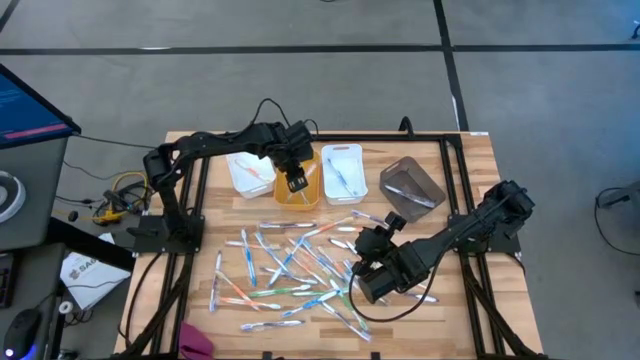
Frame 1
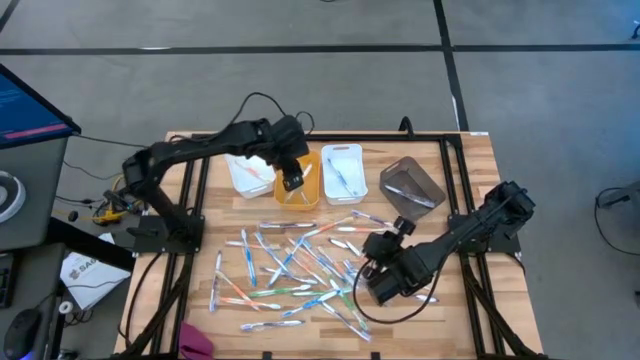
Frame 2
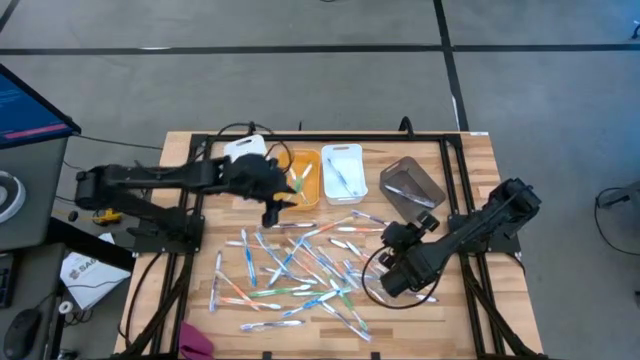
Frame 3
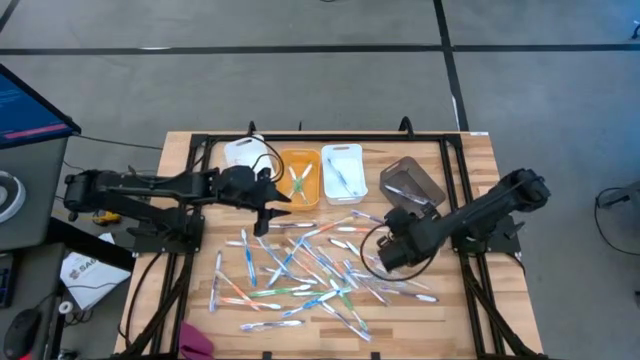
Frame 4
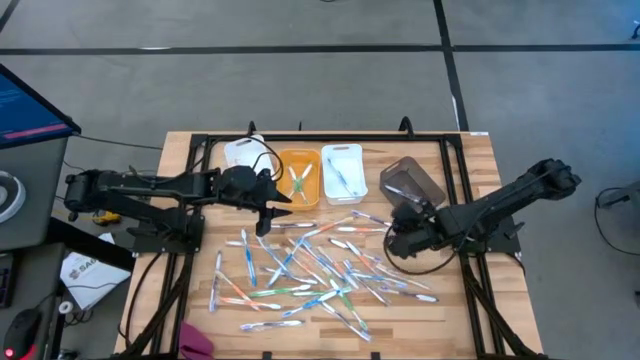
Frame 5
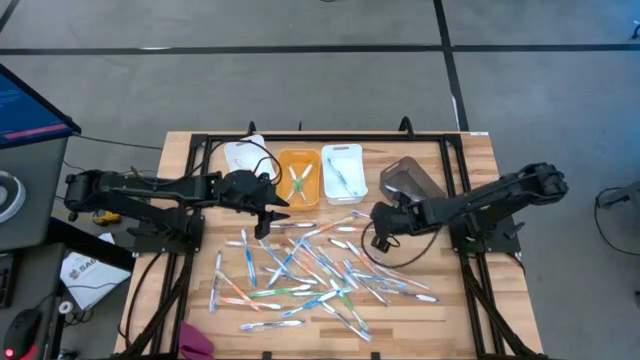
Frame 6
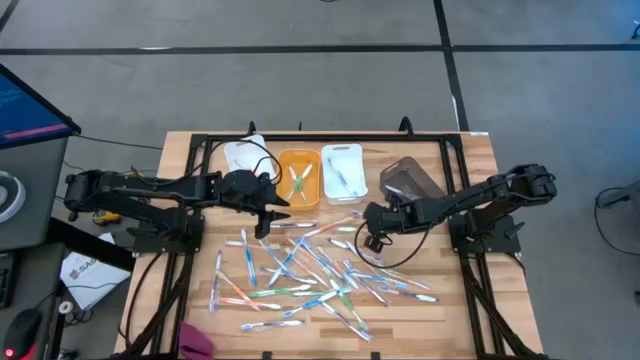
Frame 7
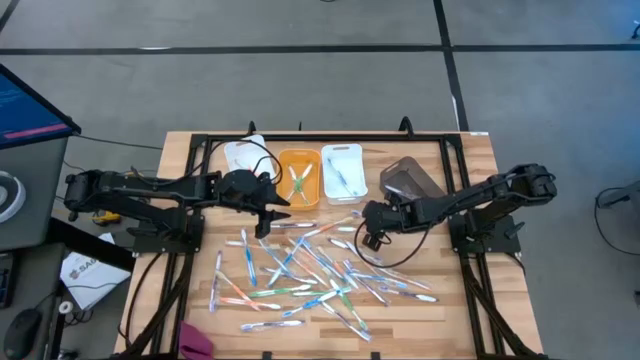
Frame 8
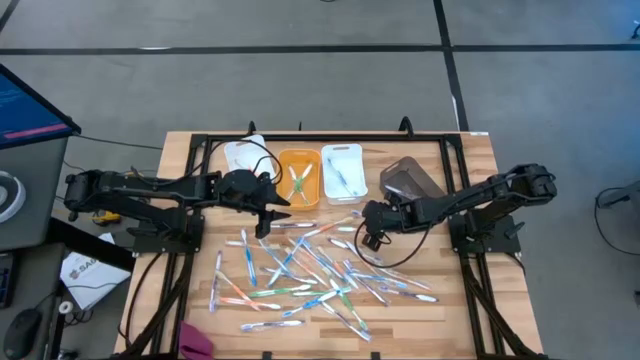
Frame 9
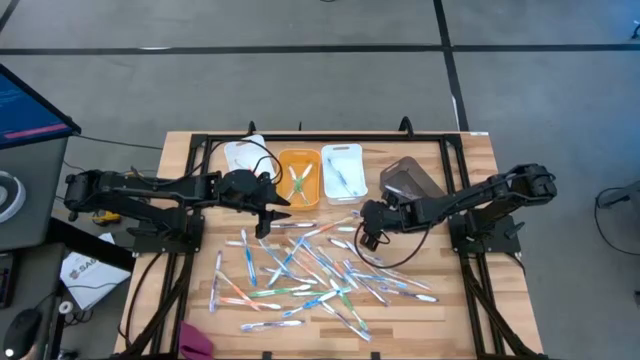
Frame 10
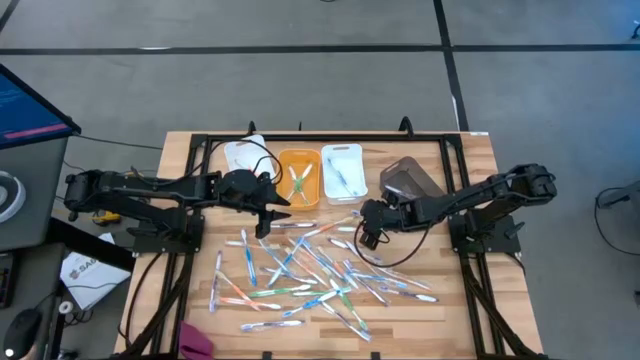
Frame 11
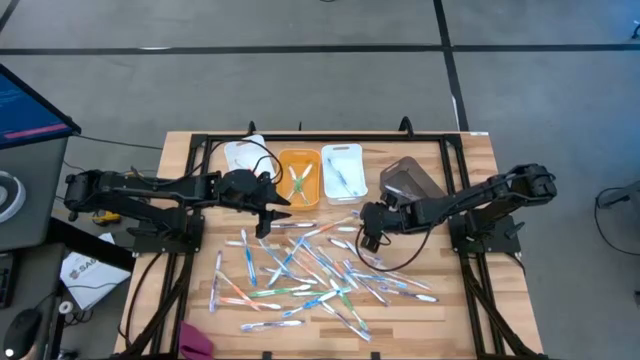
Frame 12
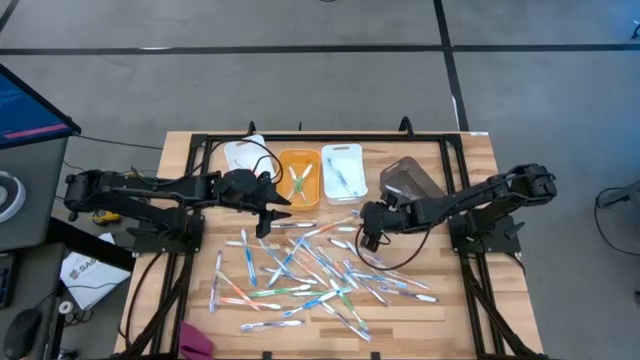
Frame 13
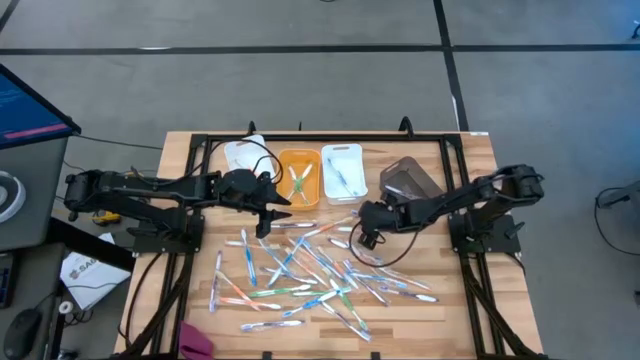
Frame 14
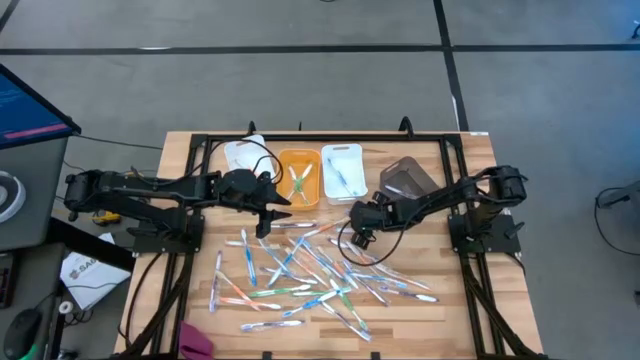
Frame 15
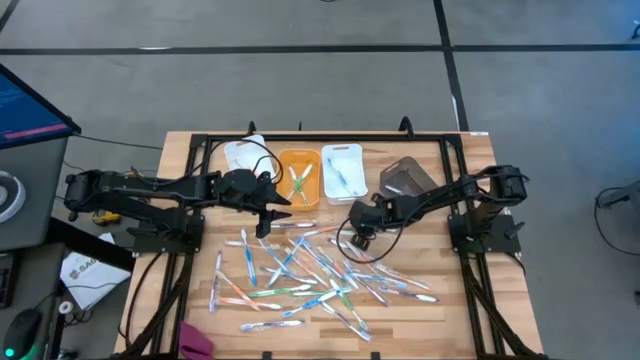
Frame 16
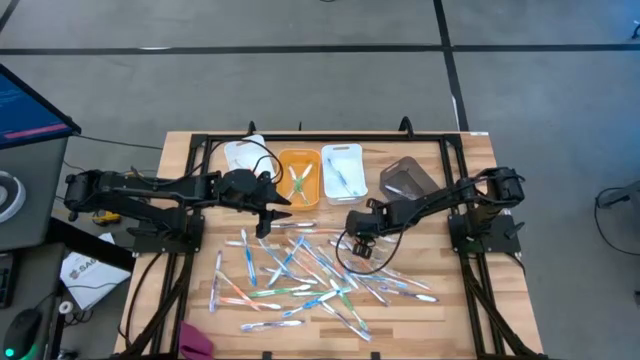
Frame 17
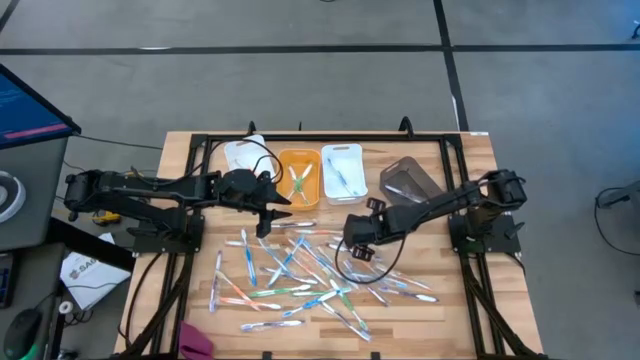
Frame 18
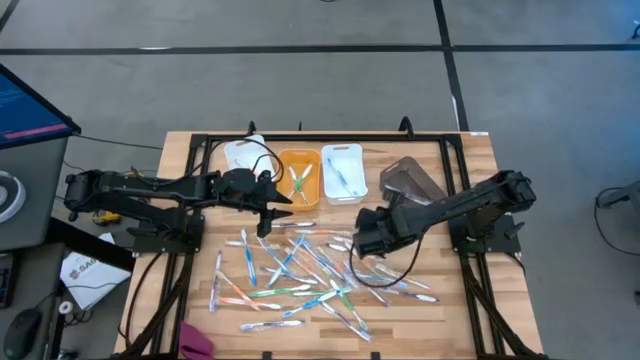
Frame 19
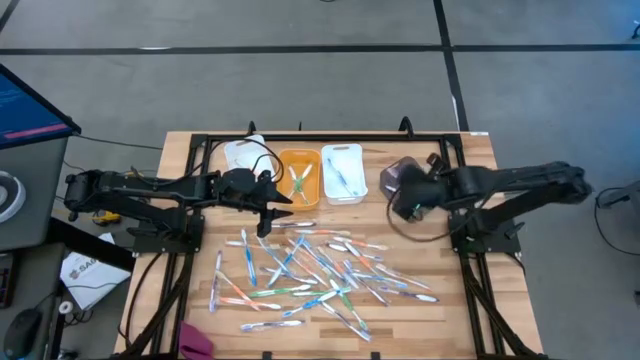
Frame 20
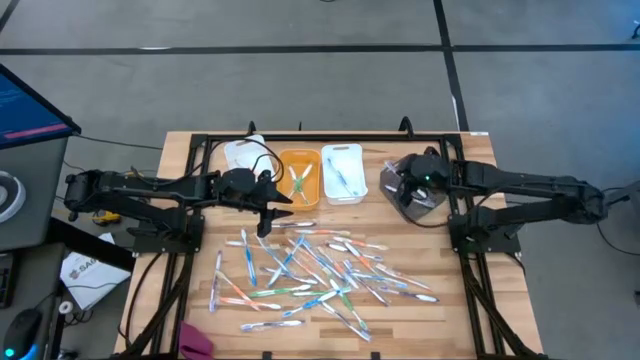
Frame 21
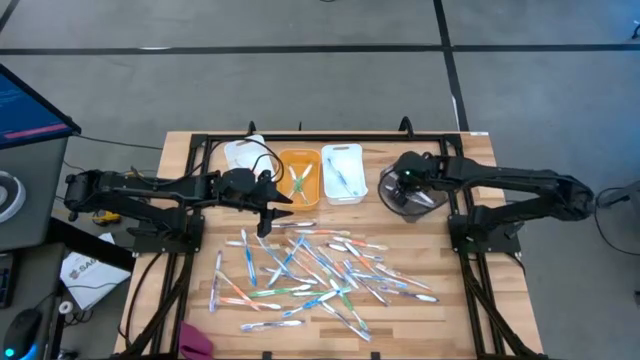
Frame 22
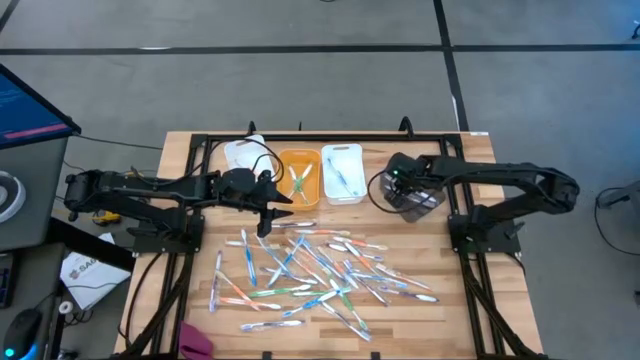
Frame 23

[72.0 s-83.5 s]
Task: Pick & Place Toothbrushes
Put the white violet toothbrush into the black transparent bin

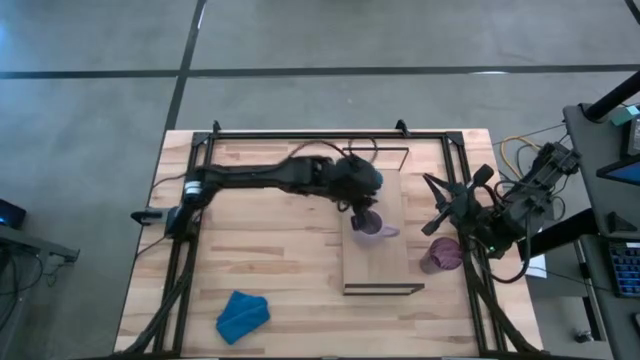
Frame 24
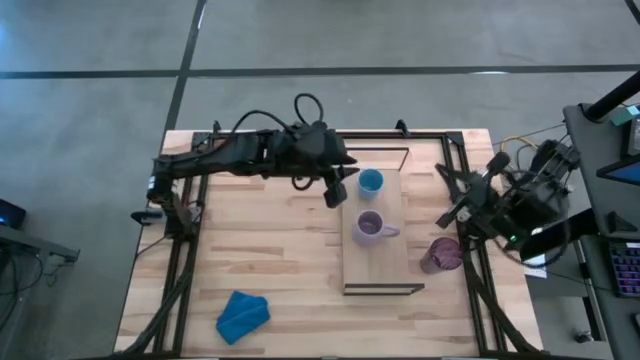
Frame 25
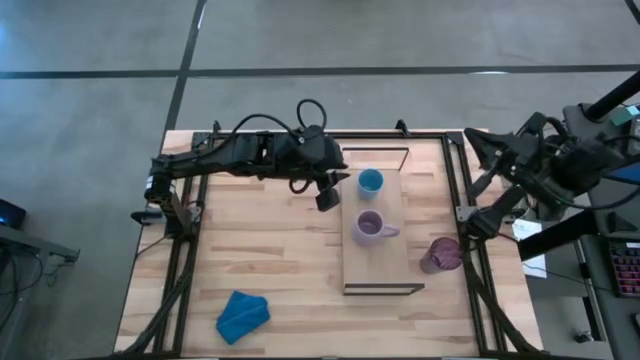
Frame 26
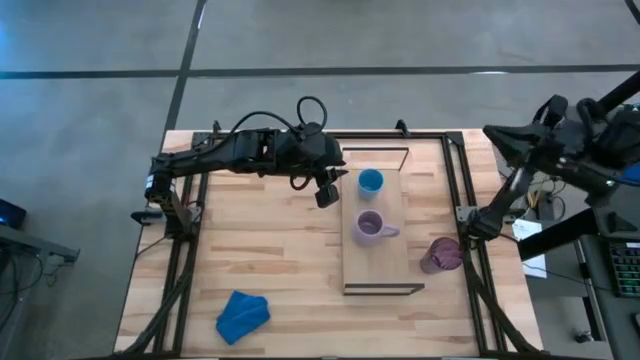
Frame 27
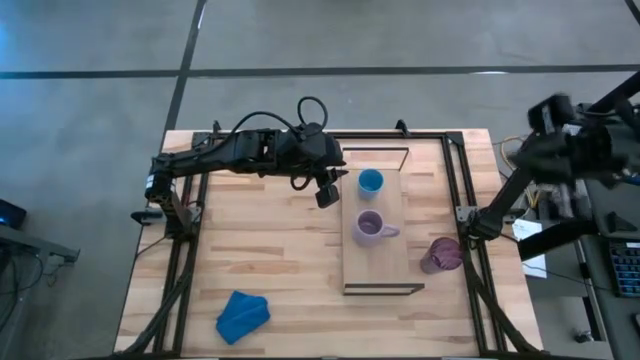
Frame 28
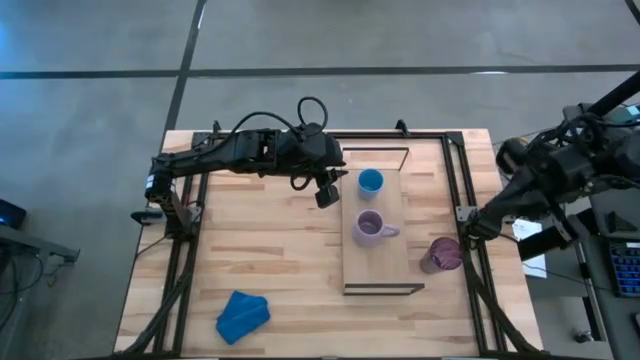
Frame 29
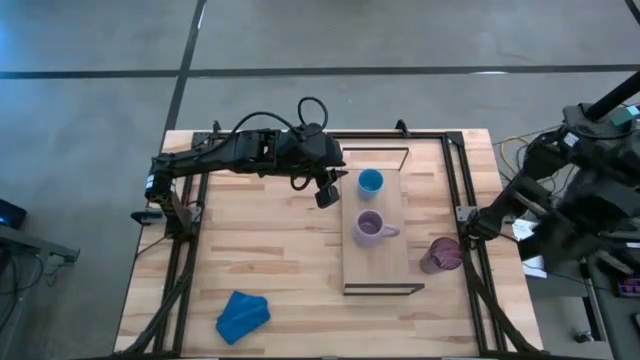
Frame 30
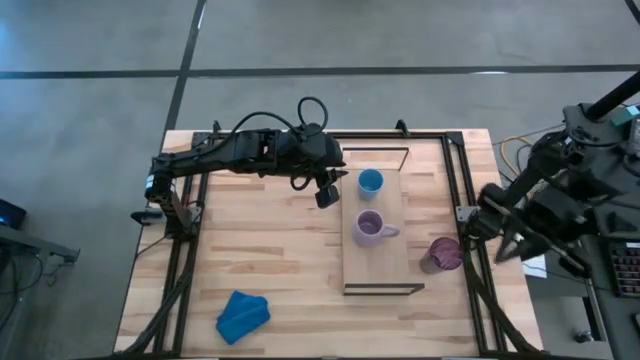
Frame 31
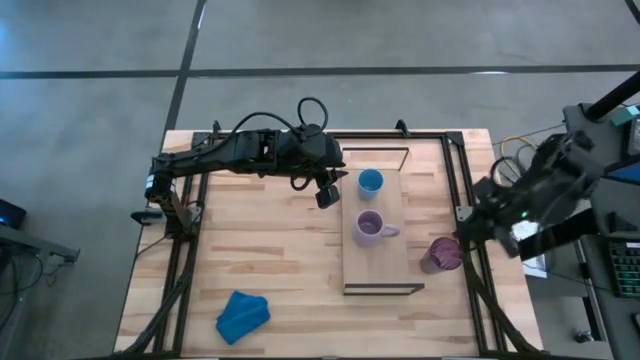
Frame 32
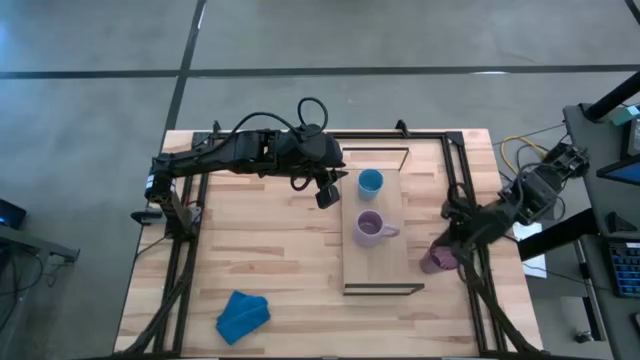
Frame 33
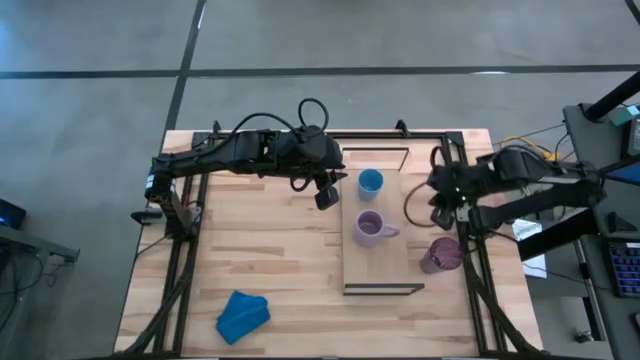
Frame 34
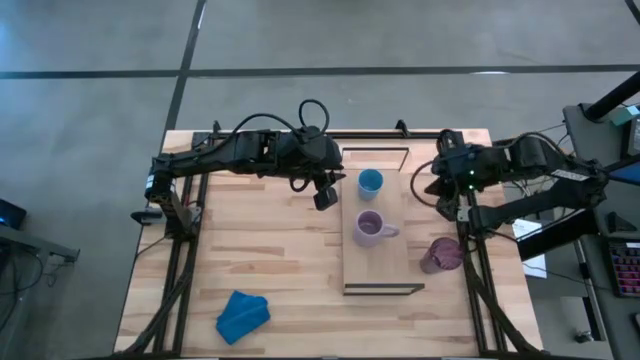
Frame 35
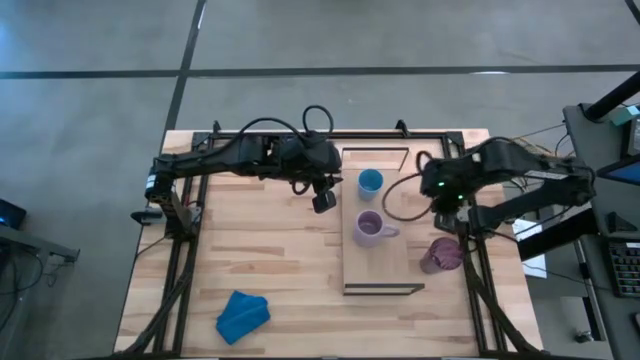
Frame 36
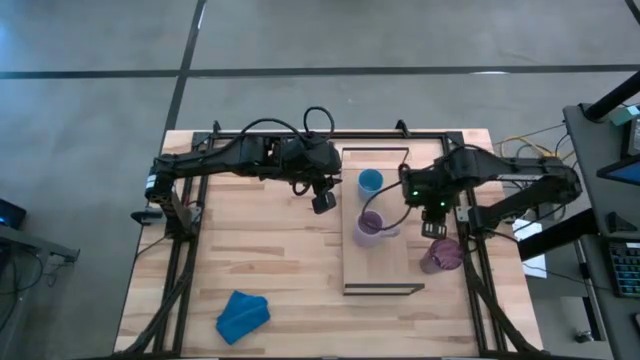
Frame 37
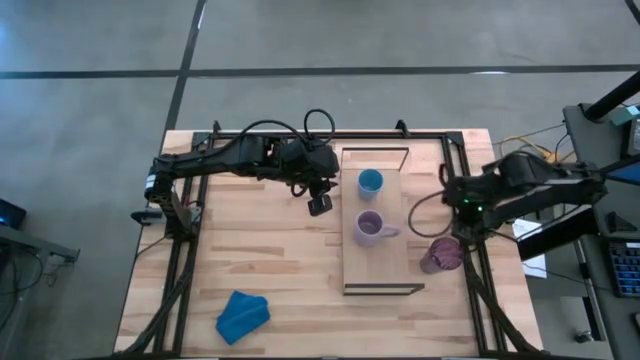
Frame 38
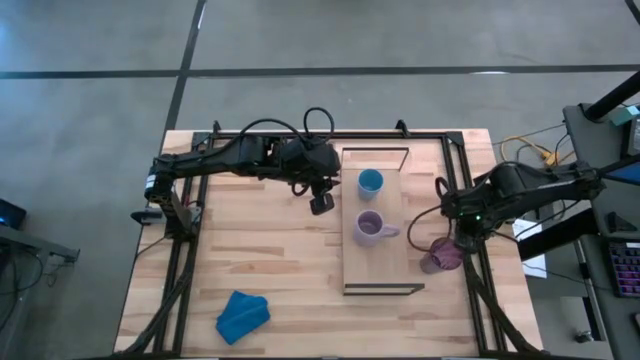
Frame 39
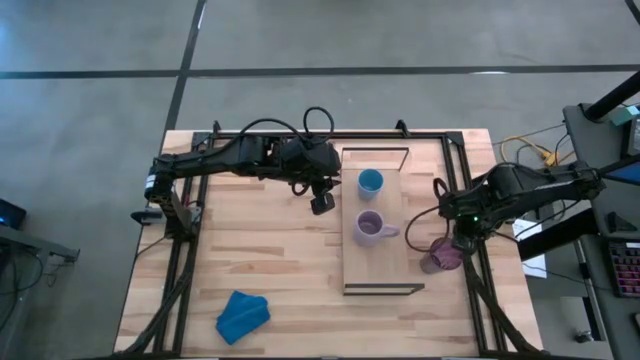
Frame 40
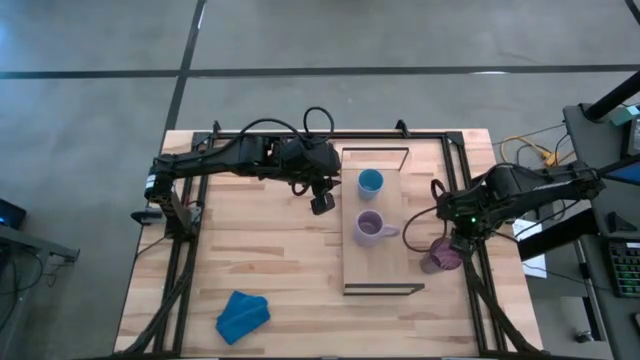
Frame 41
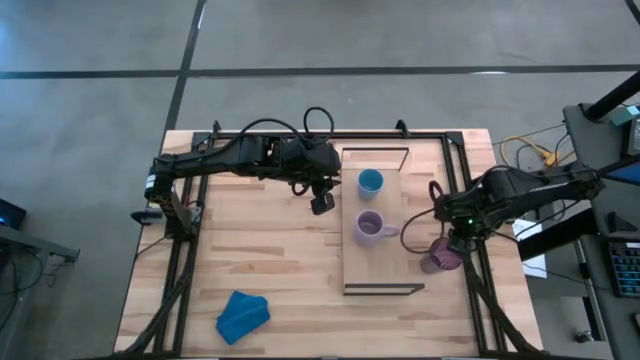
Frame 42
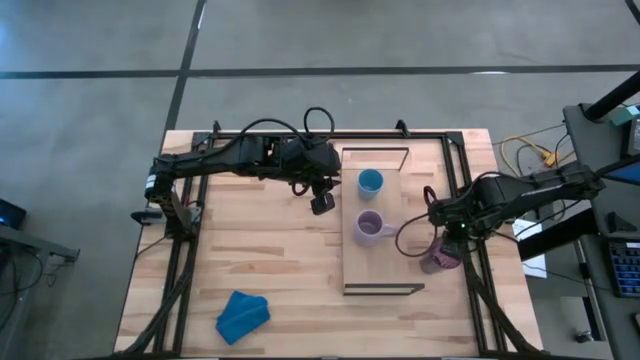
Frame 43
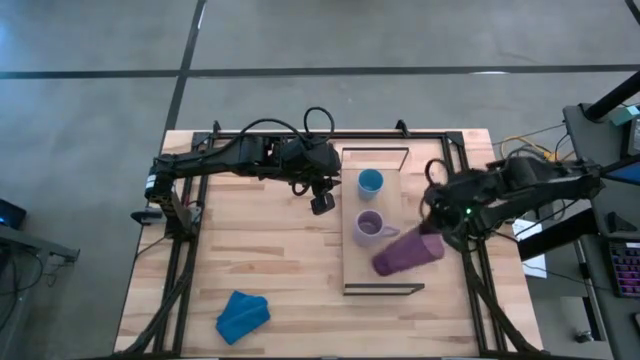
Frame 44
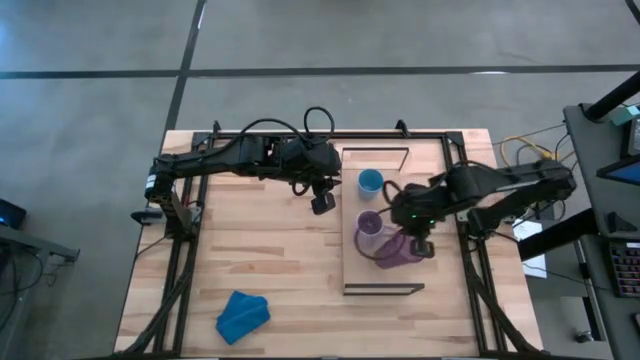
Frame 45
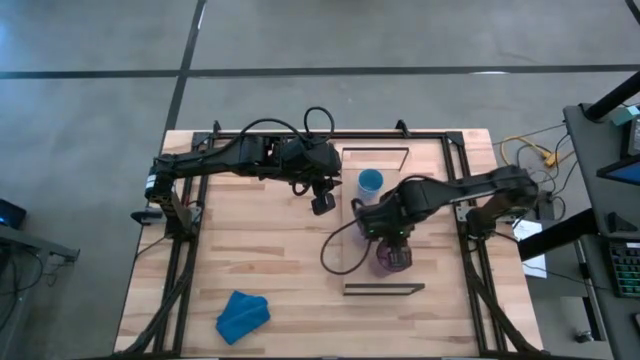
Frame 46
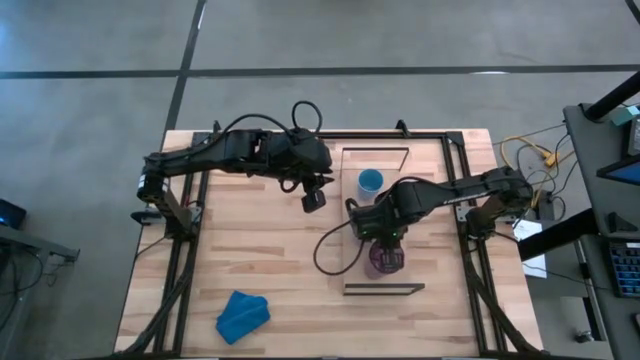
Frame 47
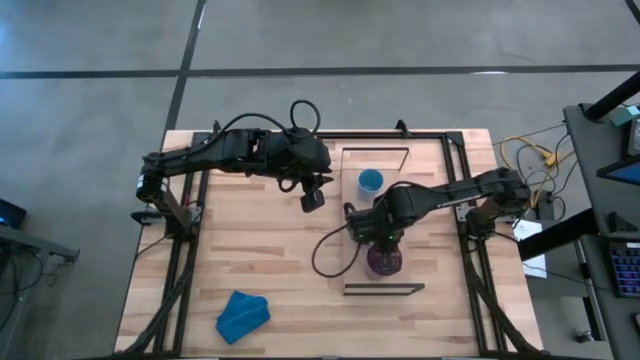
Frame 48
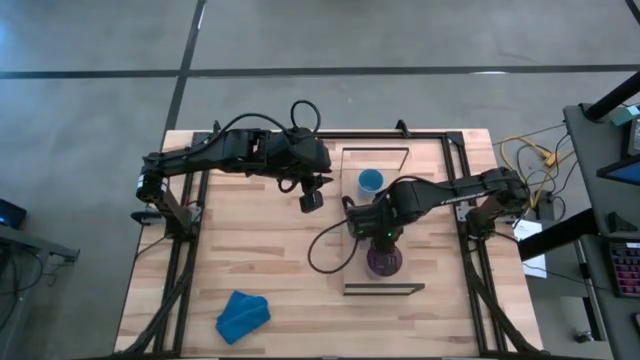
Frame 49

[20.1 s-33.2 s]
Task: Stack small to large cups/mugs on shelf
Put the purple cup on the shelf
